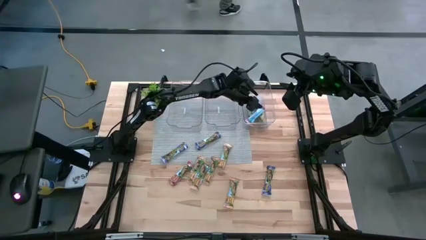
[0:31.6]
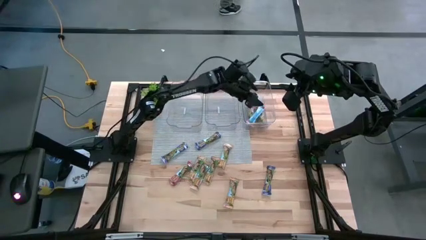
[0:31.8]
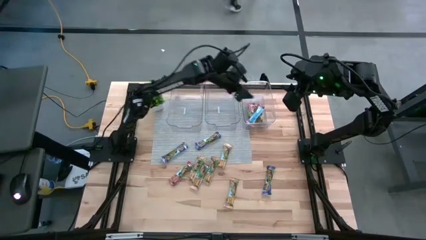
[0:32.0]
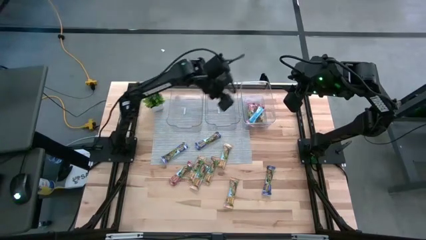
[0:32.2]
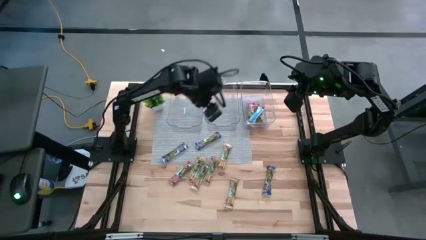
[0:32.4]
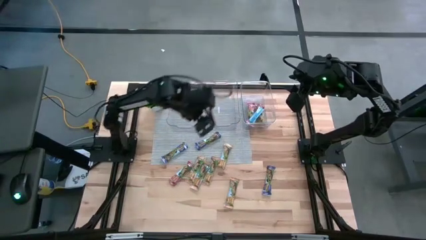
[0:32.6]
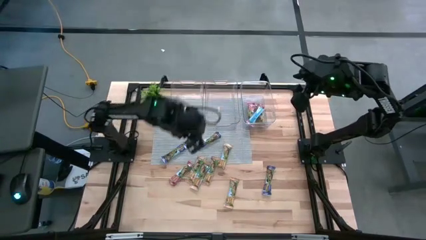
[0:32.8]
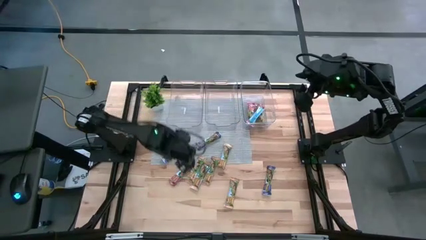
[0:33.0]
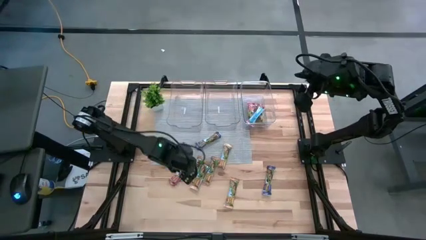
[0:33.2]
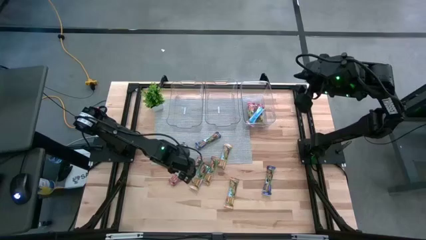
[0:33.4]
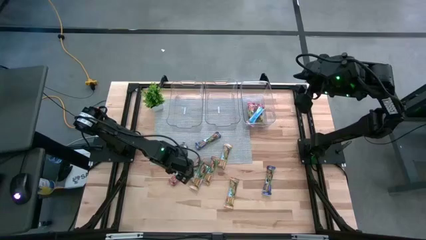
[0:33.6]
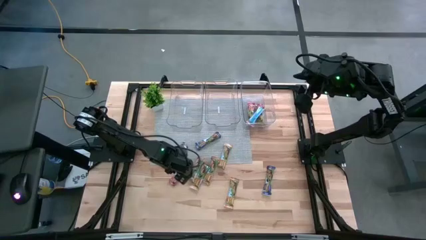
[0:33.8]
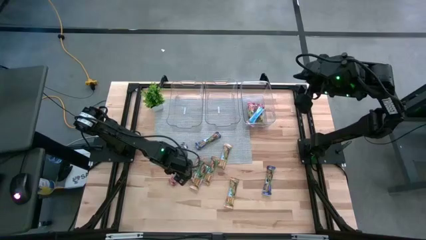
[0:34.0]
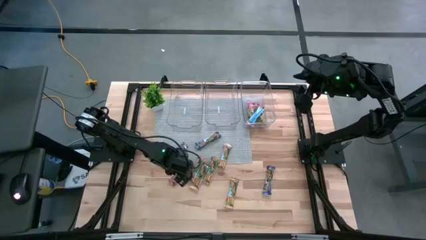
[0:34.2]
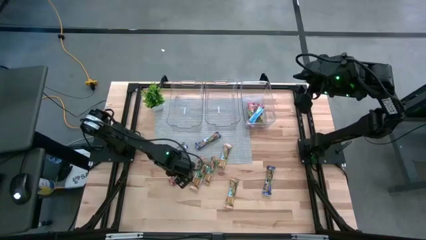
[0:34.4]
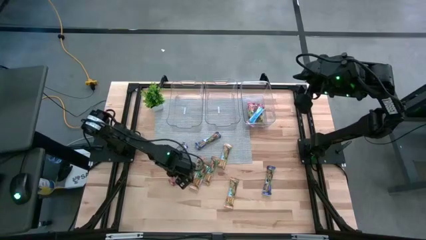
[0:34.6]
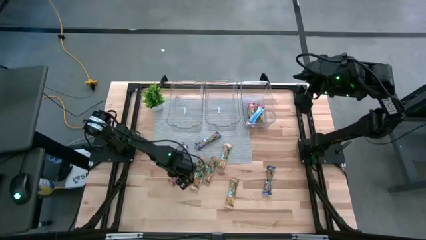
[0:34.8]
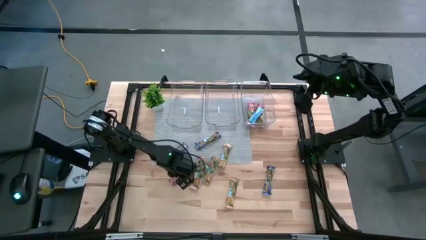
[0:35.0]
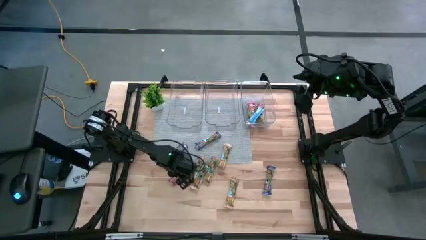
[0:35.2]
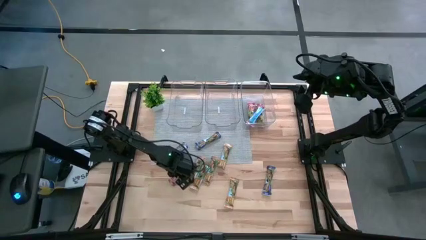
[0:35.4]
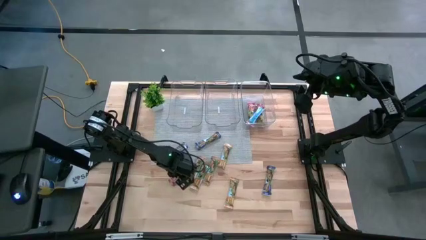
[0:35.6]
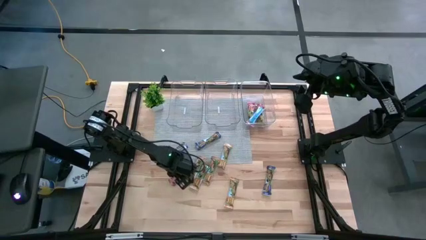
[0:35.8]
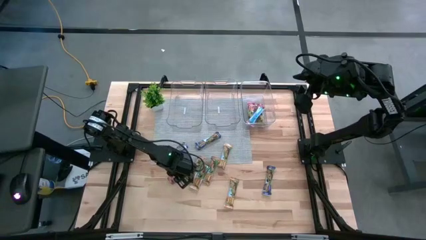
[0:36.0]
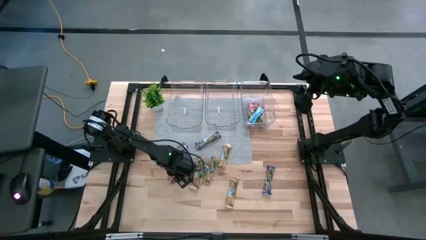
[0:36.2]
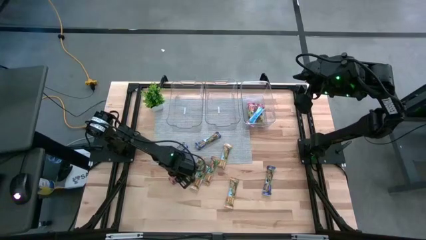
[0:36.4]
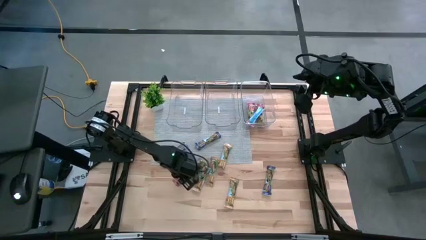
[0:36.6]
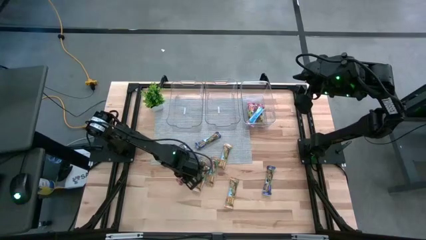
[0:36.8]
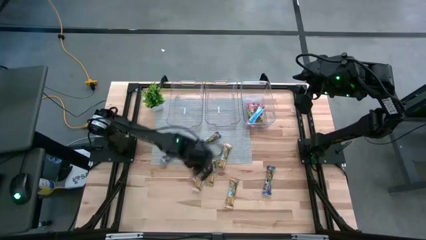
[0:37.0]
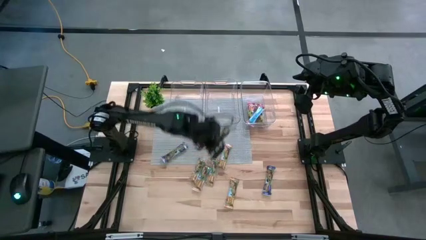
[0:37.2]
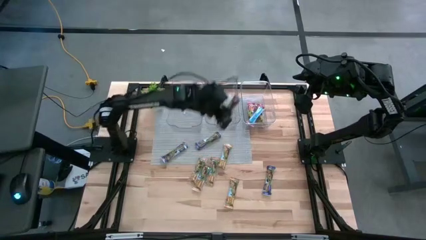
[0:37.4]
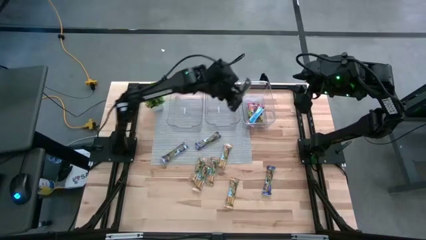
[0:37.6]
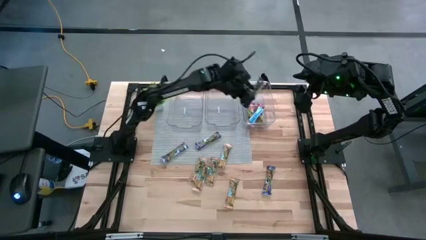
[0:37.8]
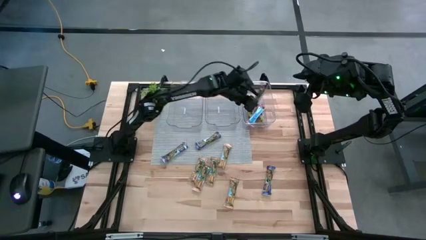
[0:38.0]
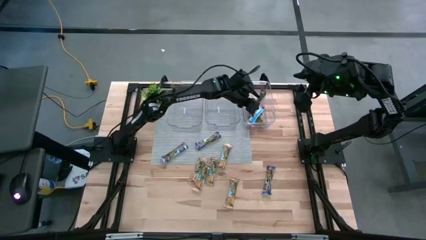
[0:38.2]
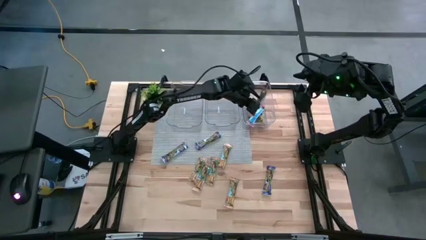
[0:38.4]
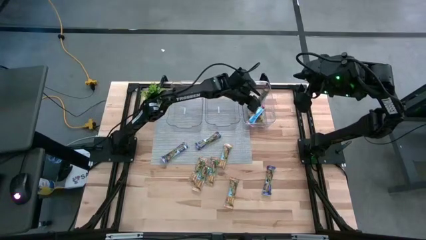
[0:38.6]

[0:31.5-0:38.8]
Task: Pick and place Granola Bars by type
Put the red granola bar into the right transparent bin

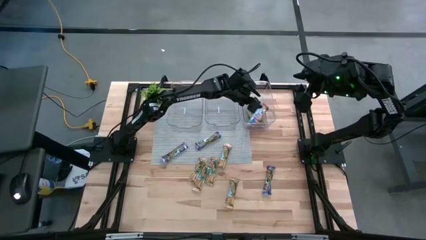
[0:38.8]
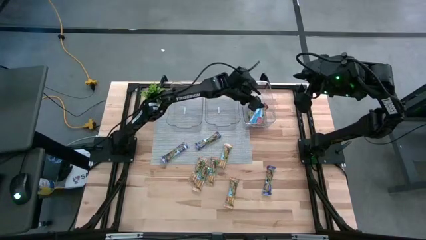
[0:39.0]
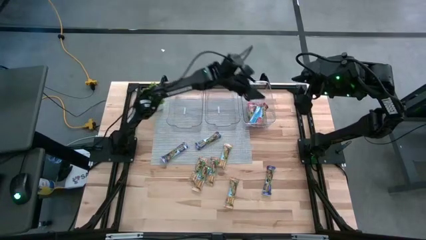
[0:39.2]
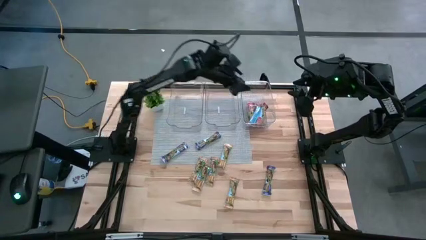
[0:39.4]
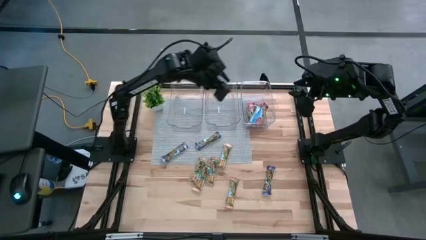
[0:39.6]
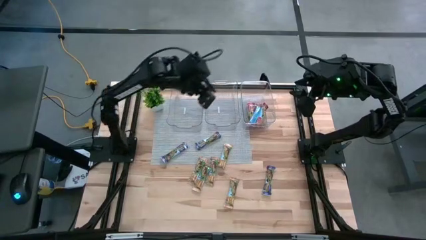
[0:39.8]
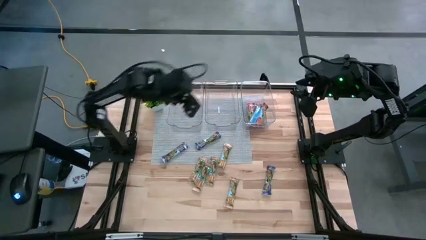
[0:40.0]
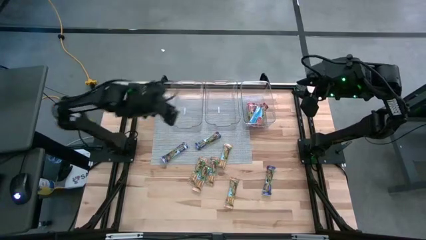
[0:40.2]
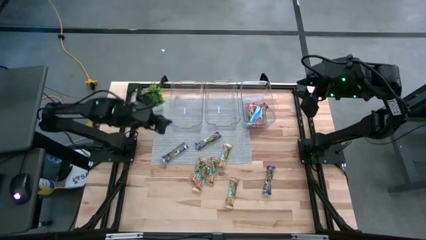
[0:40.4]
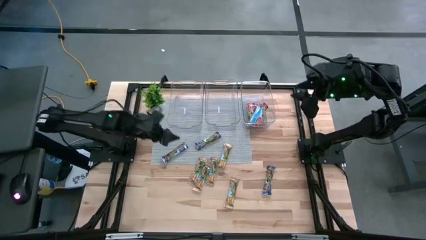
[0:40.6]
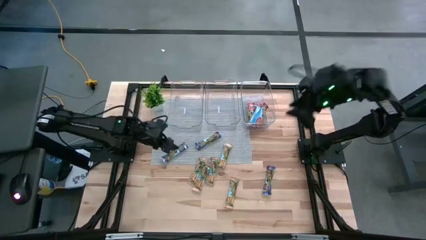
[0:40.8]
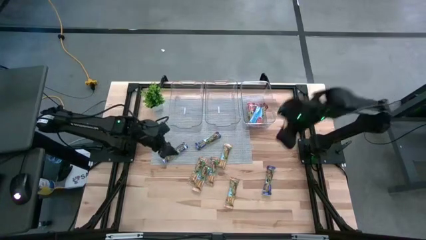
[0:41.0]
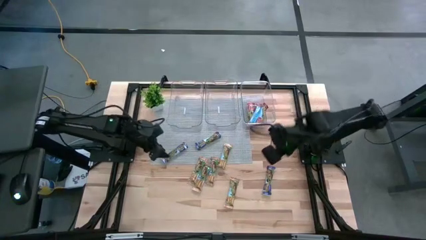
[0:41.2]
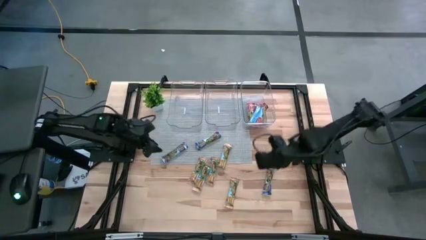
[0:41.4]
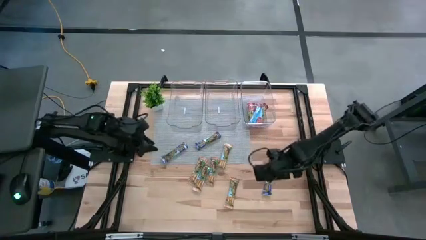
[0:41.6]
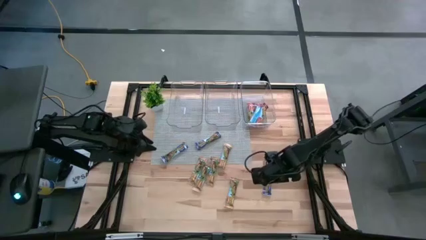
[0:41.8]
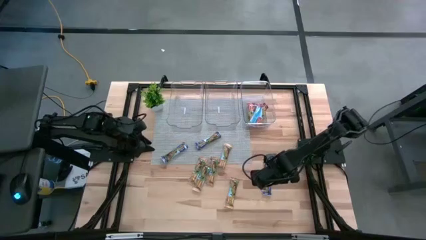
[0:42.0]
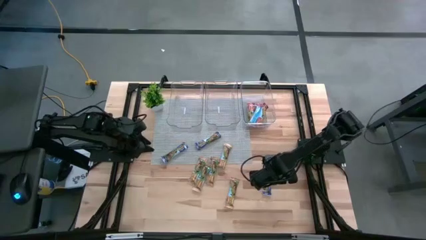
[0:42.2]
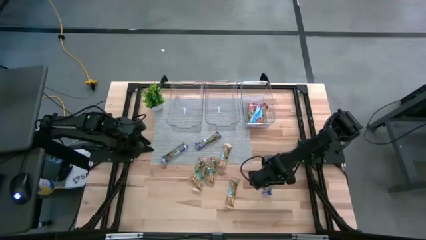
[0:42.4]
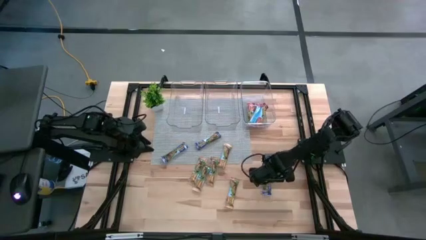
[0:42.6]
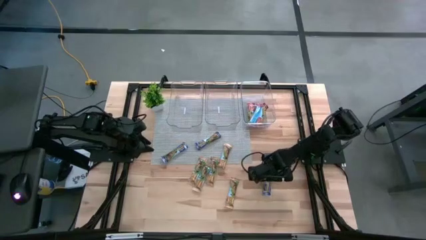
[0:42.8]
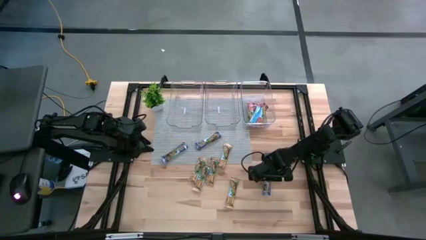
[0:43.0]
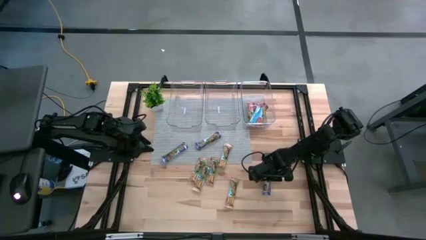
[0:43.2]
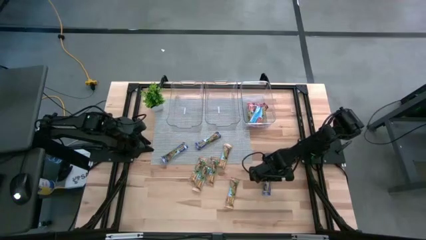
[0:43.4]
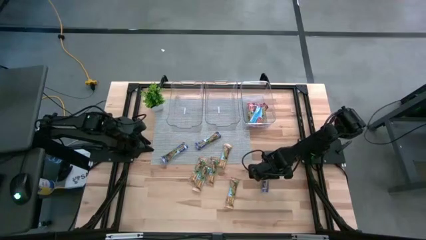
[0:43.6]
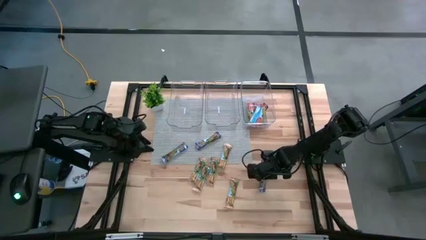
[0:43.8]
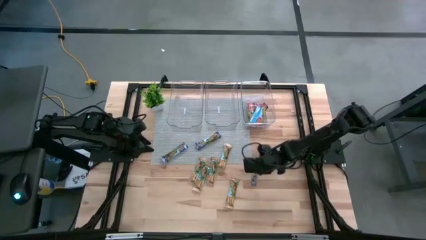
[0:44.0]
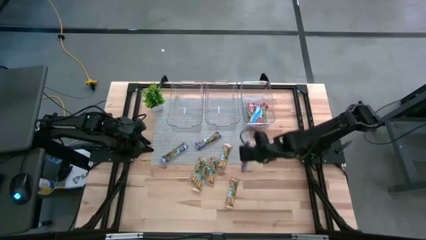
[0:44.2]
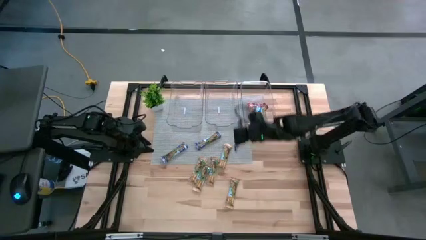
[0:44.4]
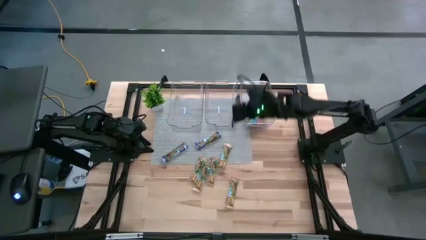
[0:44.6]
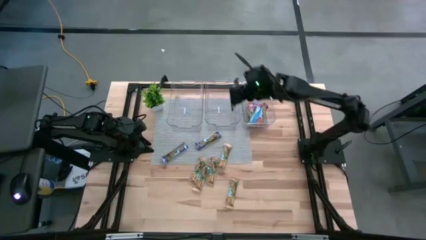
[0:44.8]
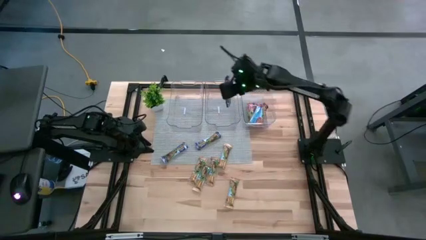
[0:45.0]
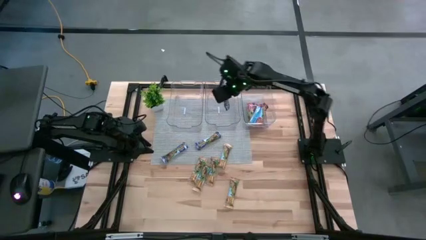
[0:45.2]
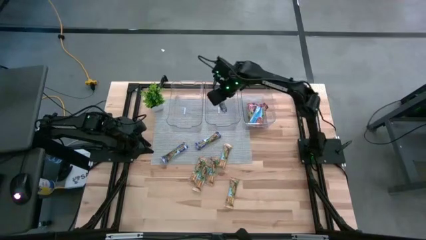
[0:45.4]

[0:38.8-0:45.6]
Put the blue granola bar into the middle transparent bin
